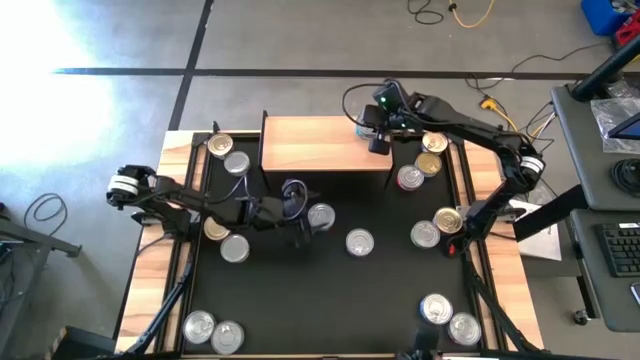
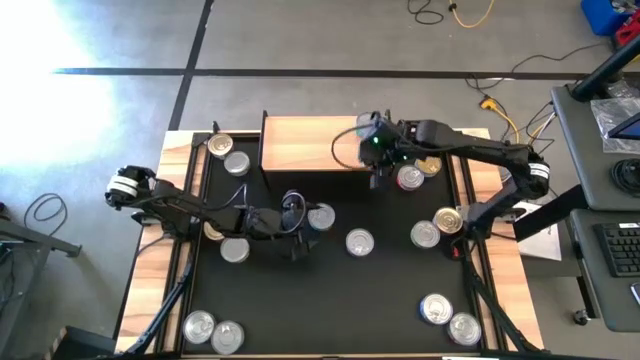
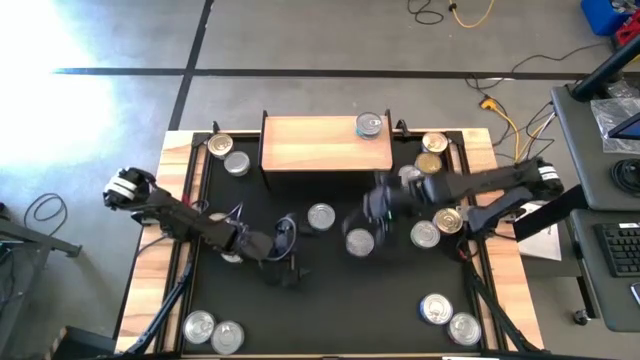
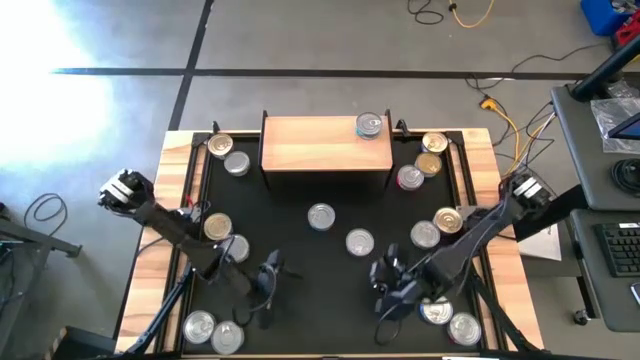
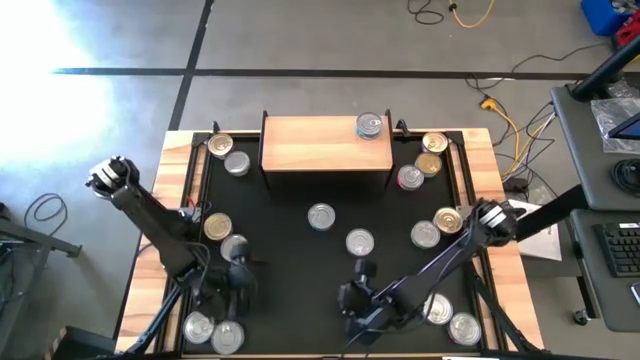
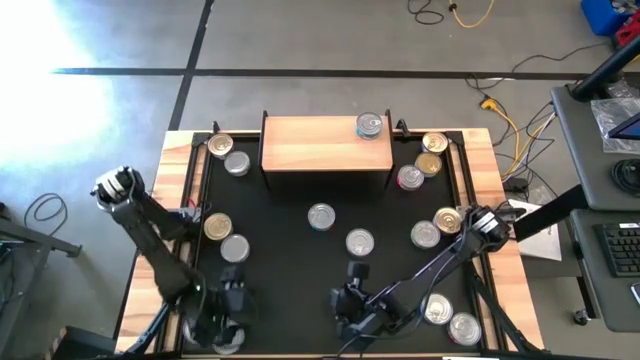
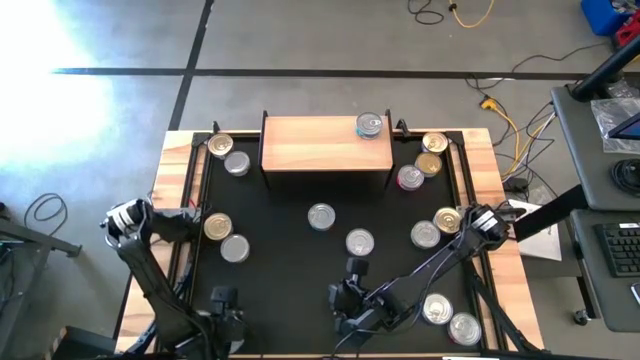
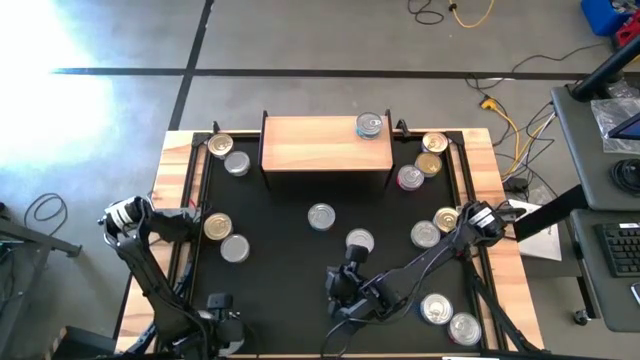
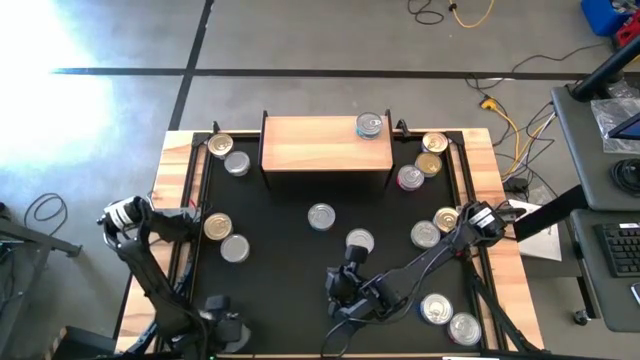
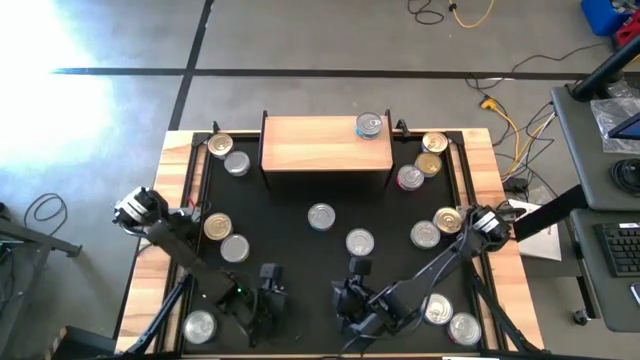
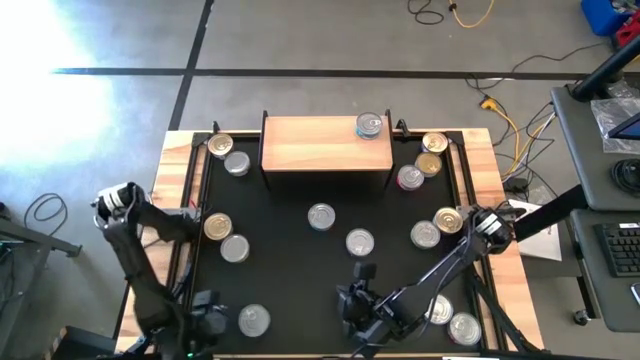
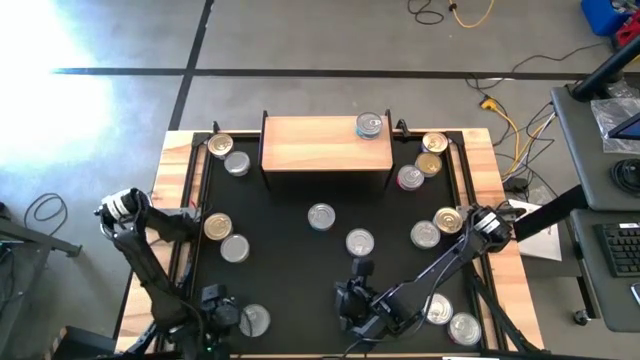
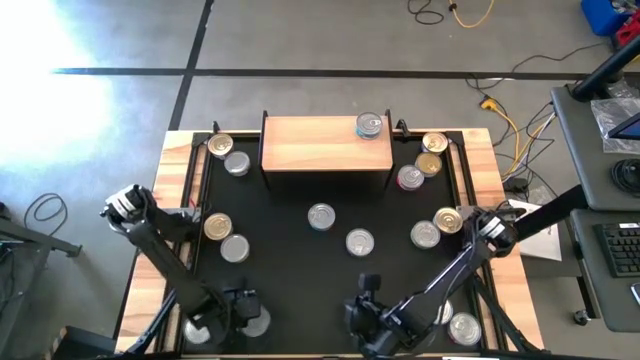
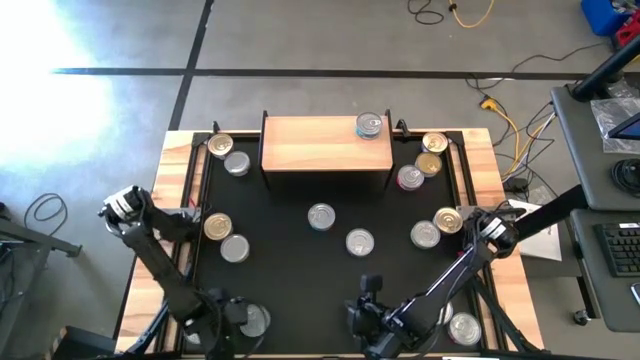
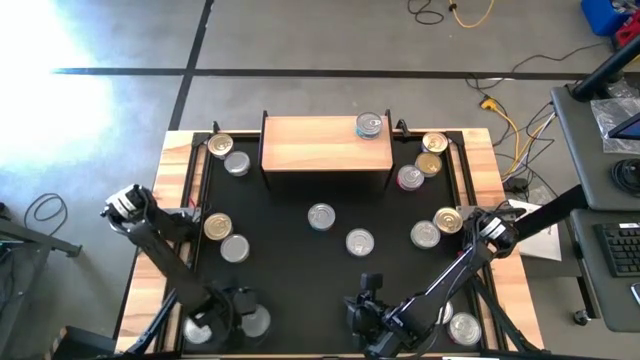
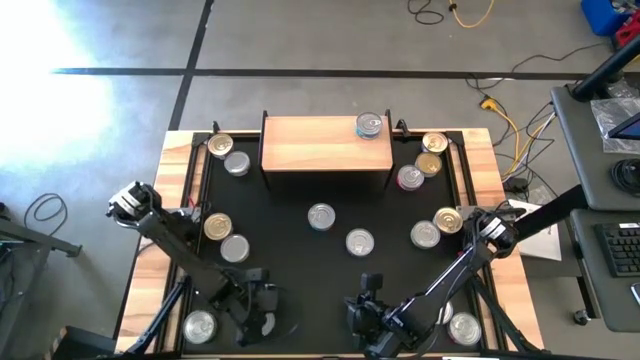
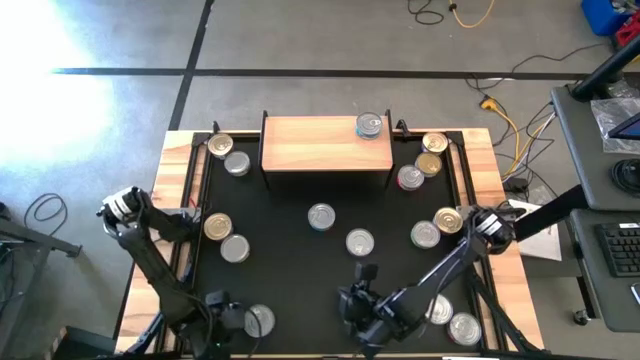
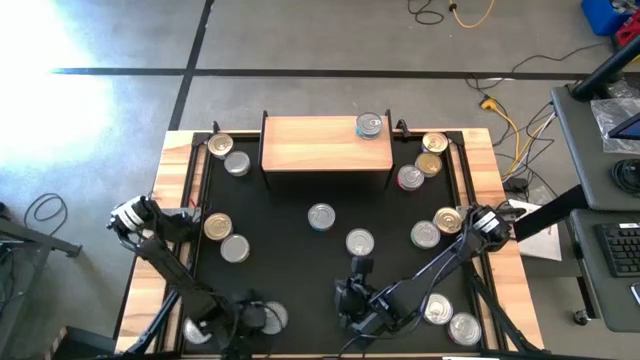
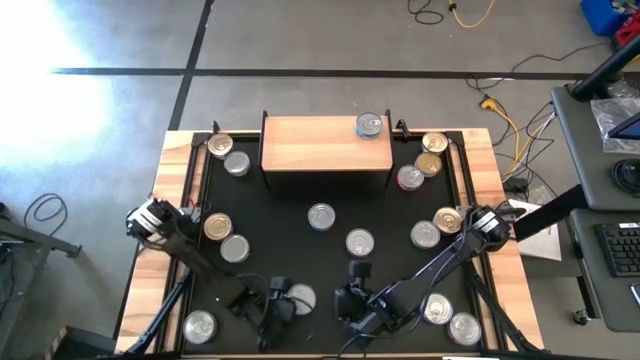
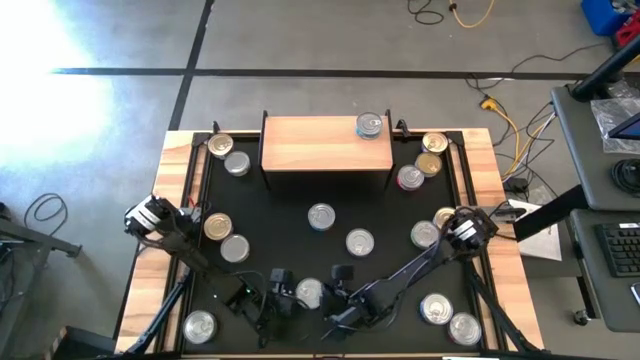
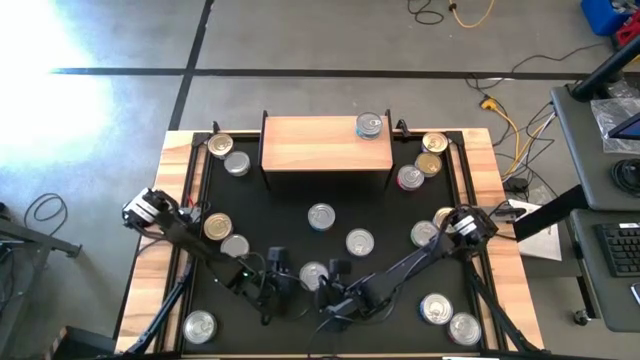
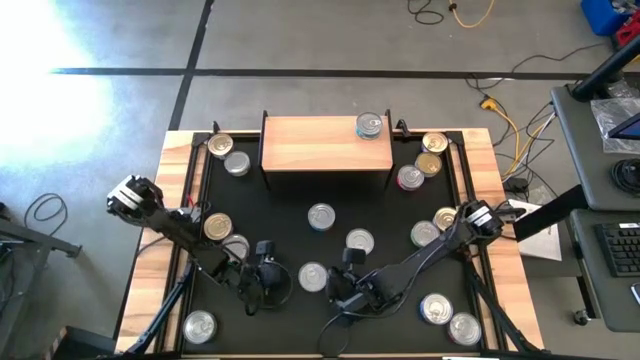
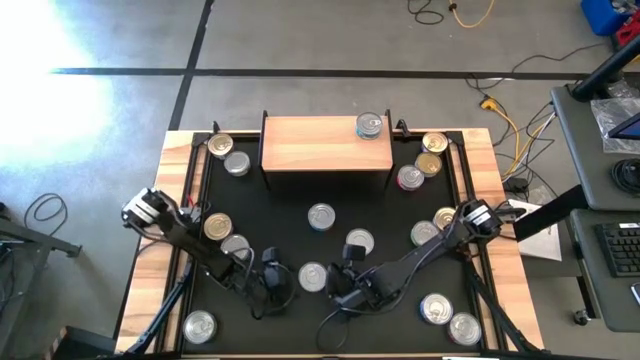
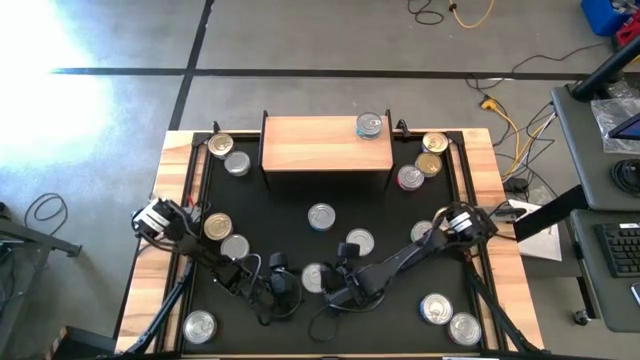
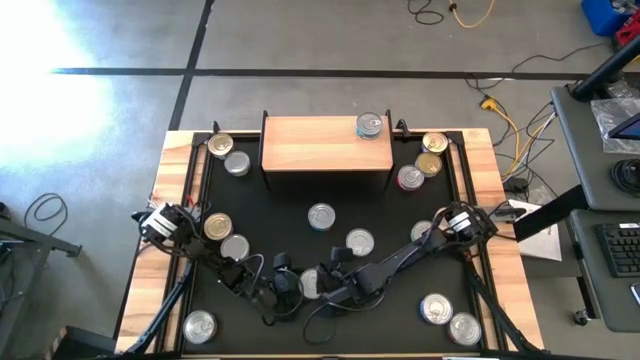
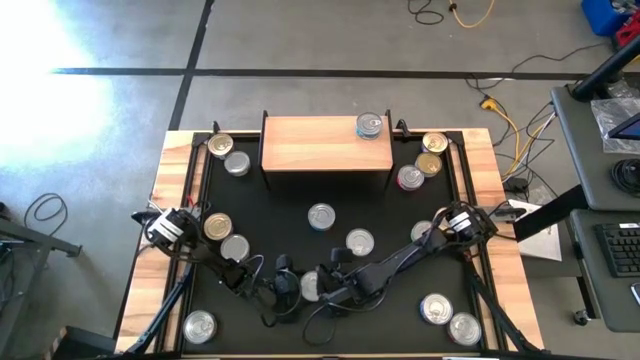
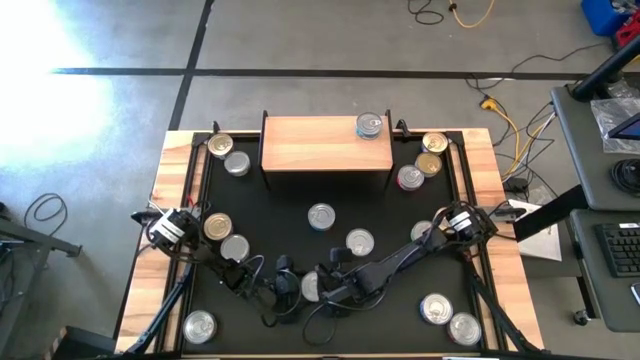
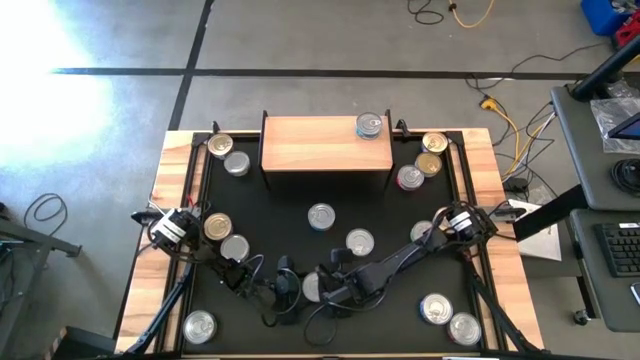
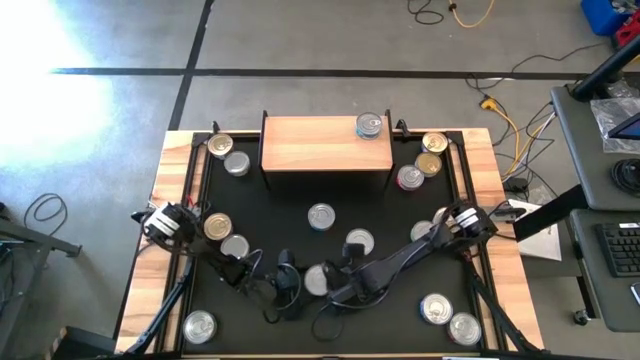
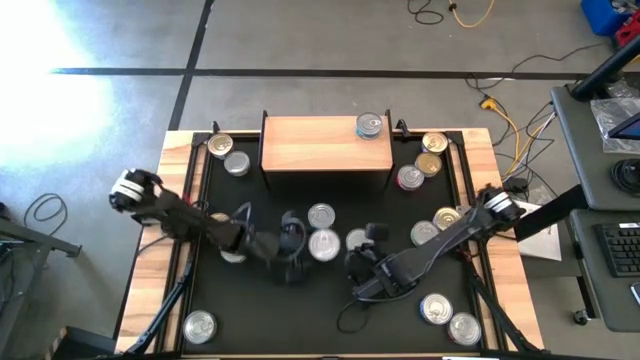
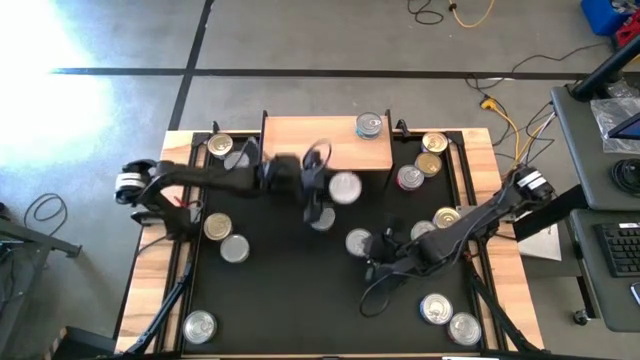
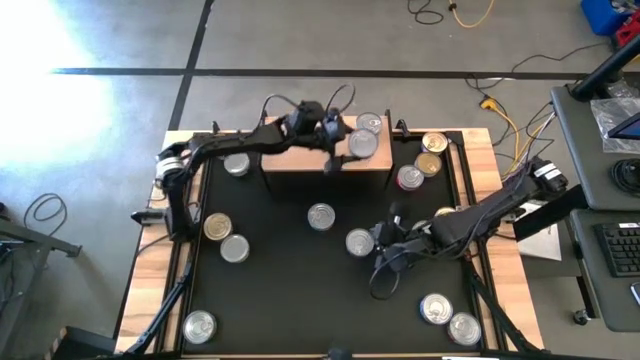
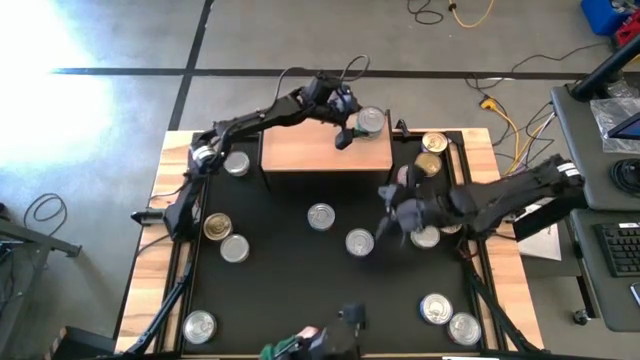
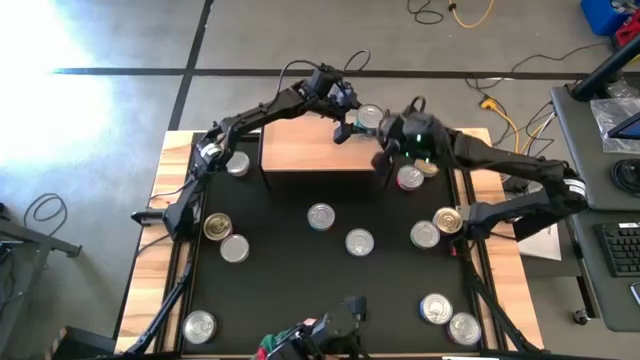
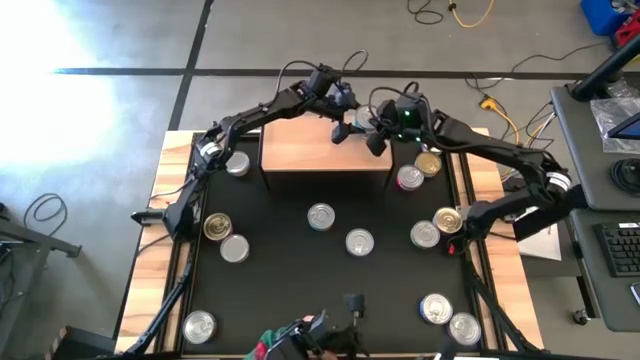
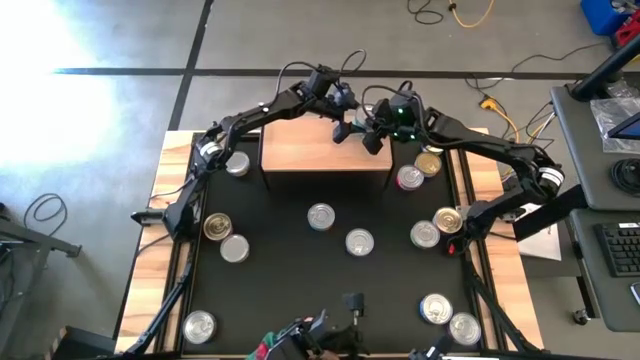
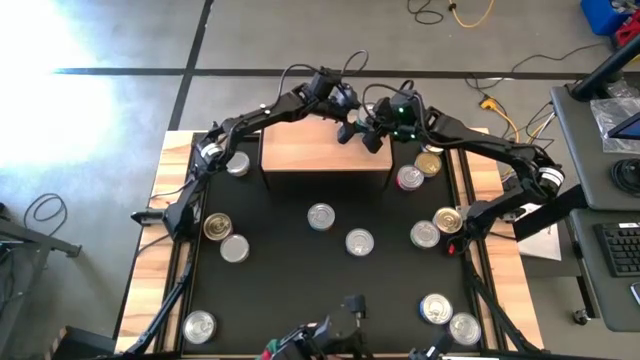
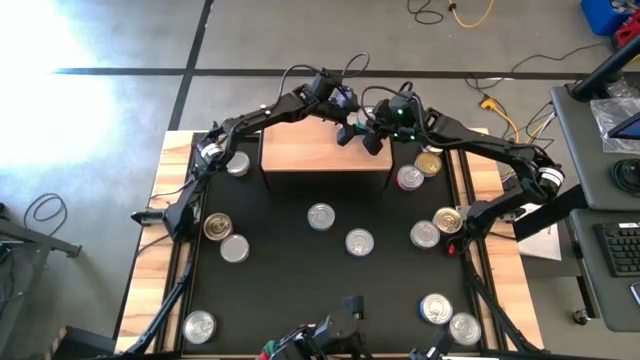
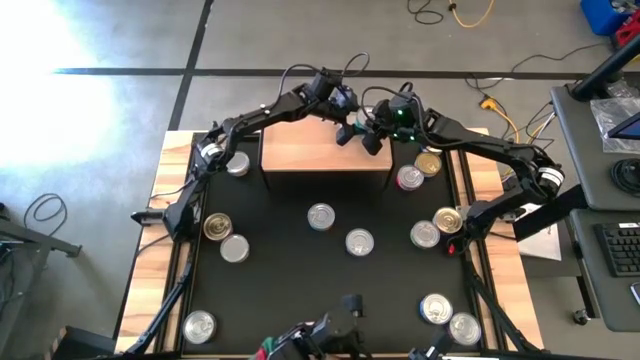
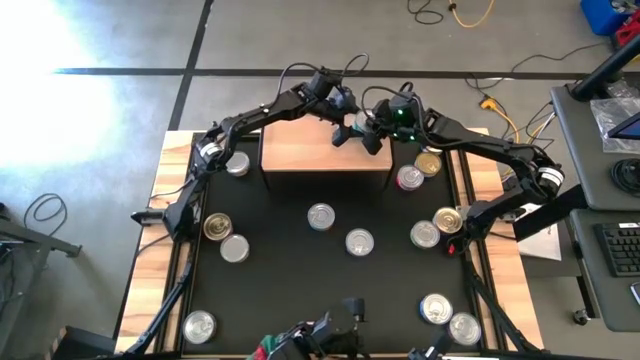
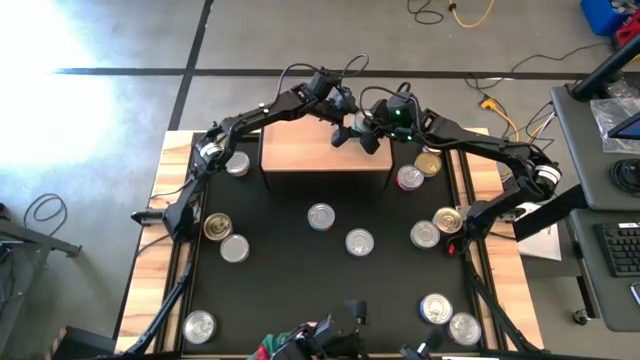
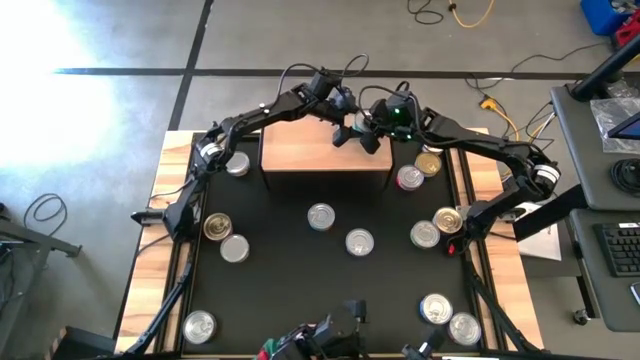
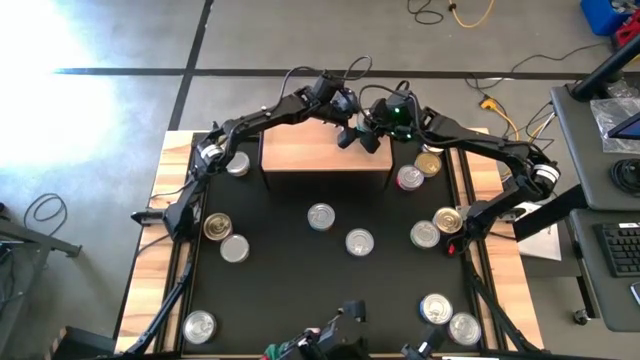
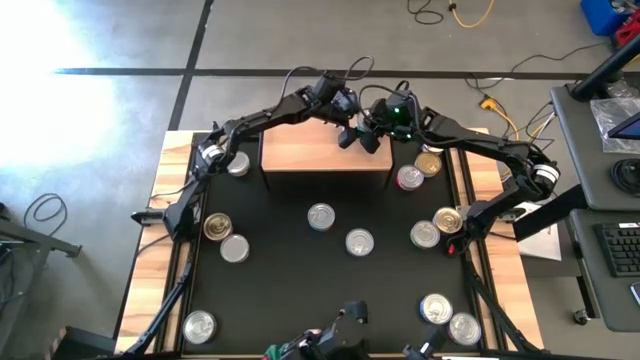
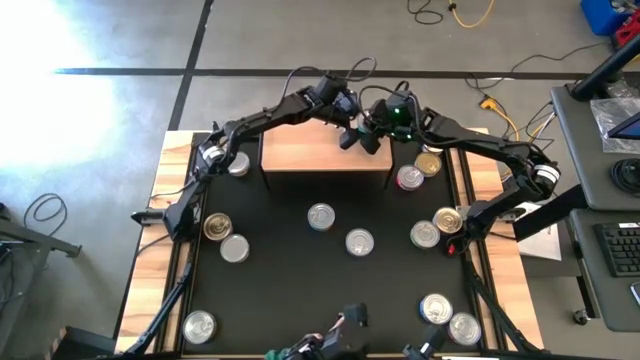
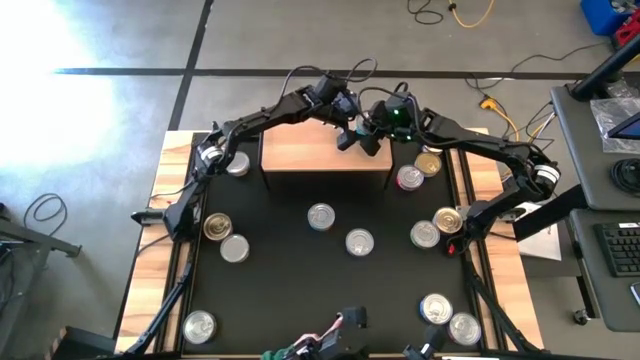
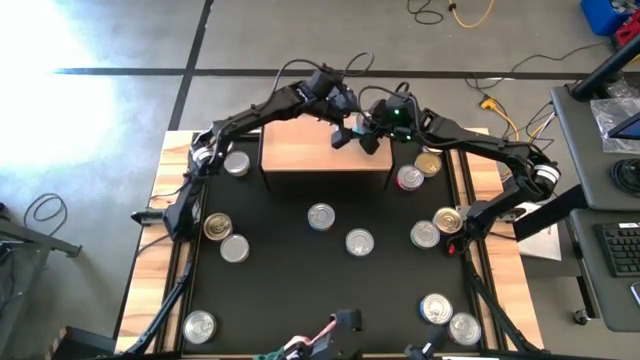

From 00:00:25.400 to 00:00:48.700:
Task: Stack canned seafood by type on shelf
Stack the light blue tuna can on top of the light blue tuna can on the shelf
